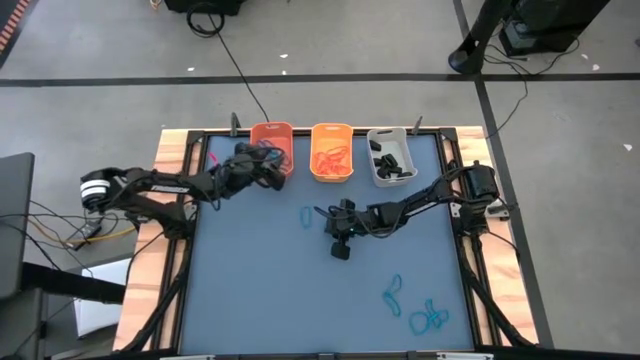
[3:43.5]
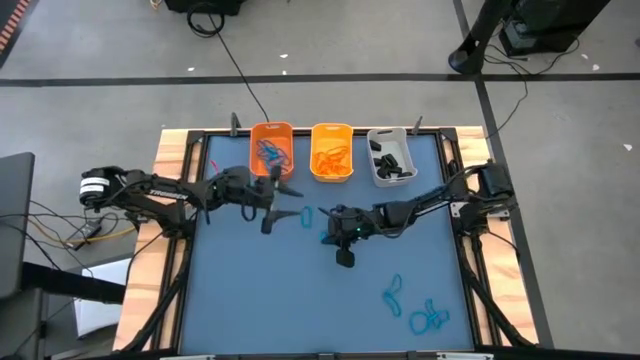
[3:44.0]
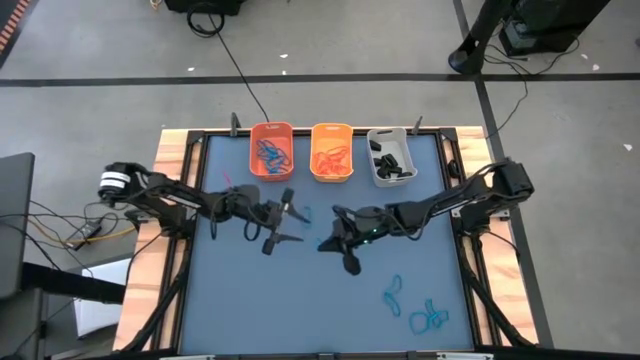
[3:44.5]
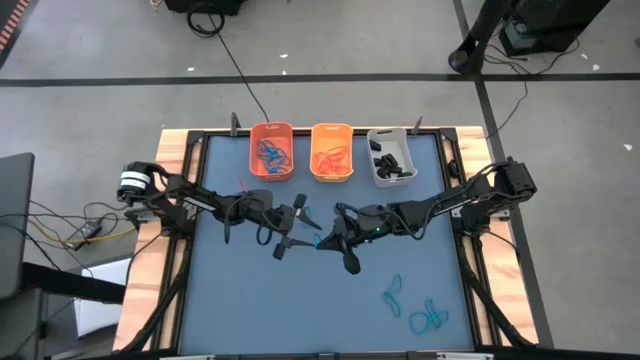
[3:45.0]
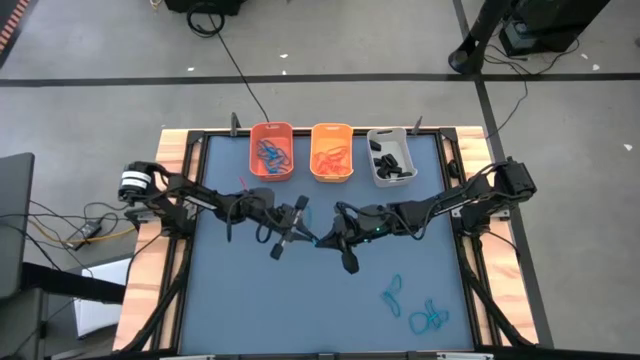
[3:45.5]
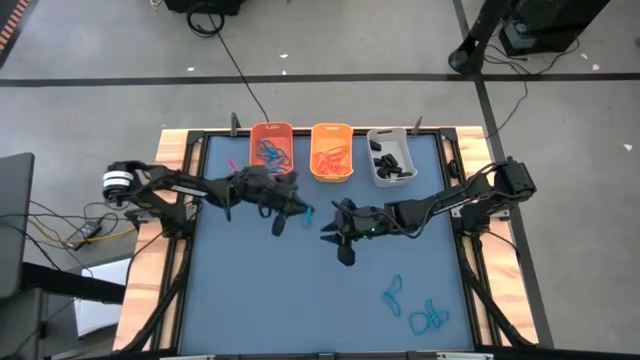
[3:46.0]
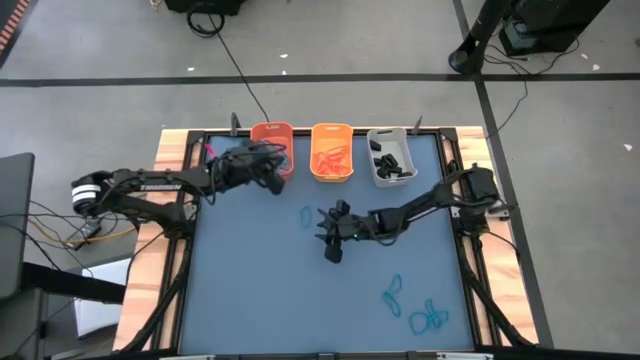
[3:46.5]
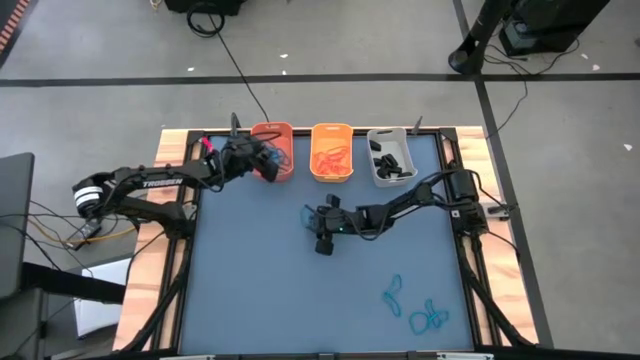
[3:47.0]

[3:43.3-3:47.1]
Task: Sort rubber bands into baskets
Put the blue rubber band into the orange bin

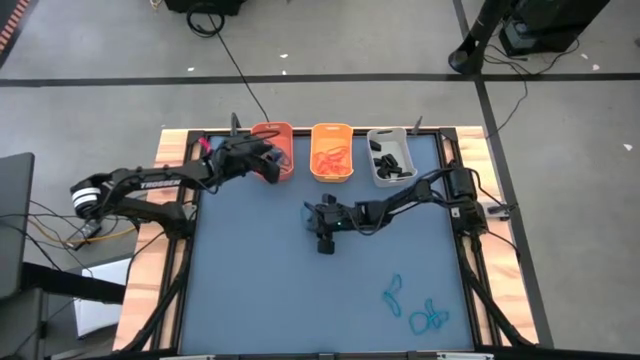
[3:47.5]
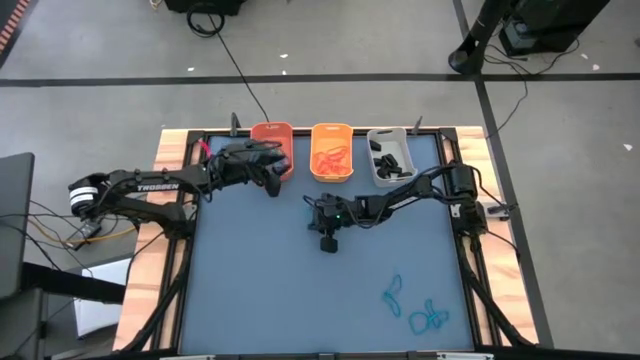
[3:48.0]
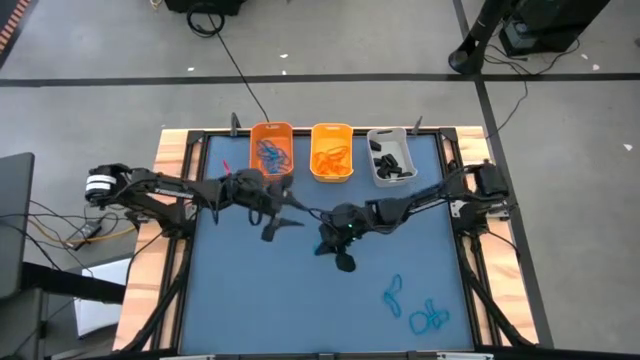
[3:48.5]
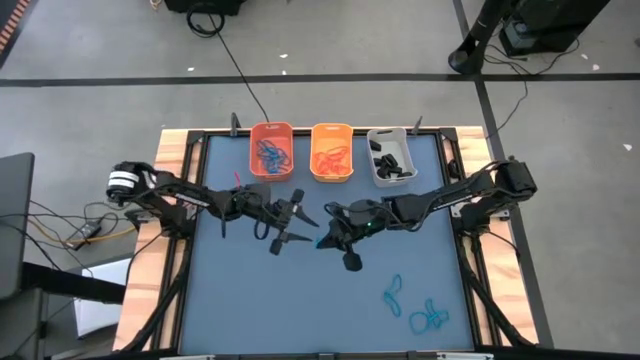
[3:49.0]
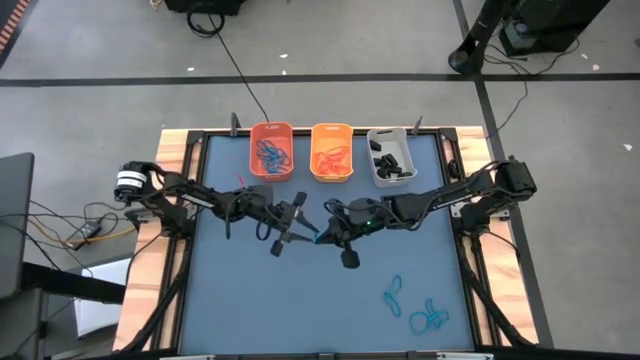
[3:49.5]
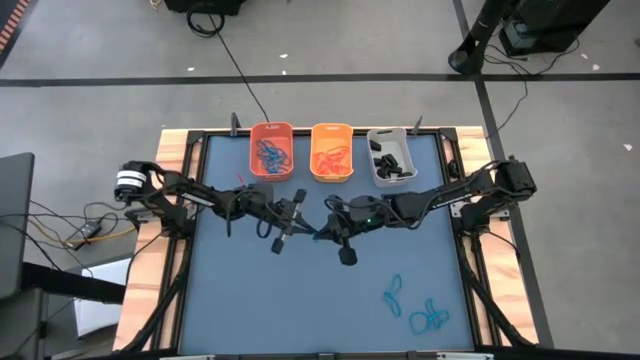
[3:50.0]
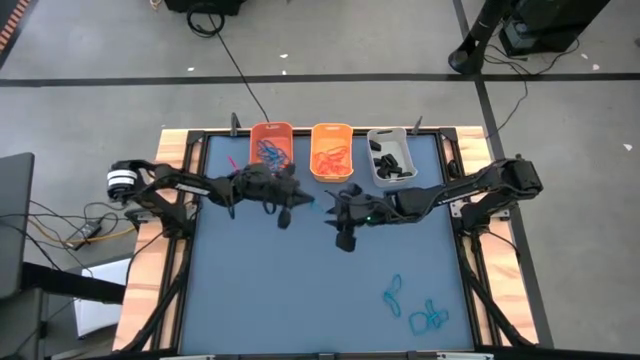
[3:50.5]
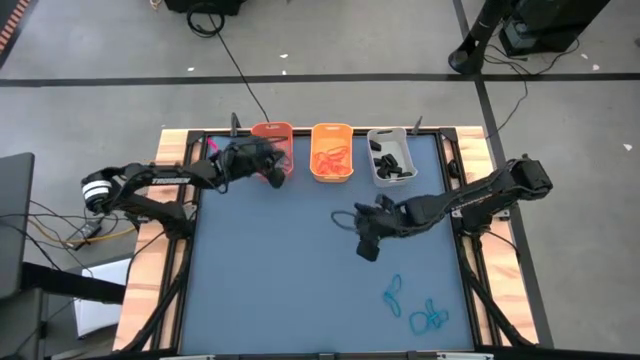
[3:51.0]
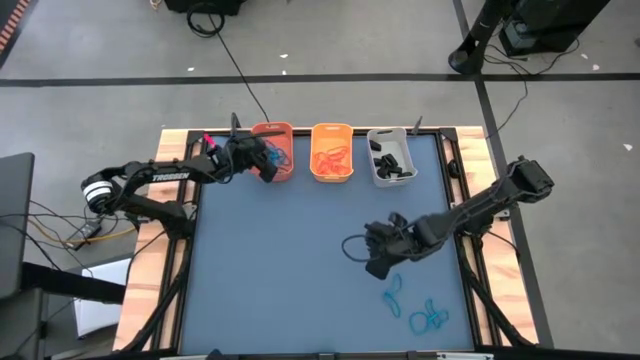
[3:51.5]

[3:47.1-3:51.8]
Put the blue rubber band into the orange bin

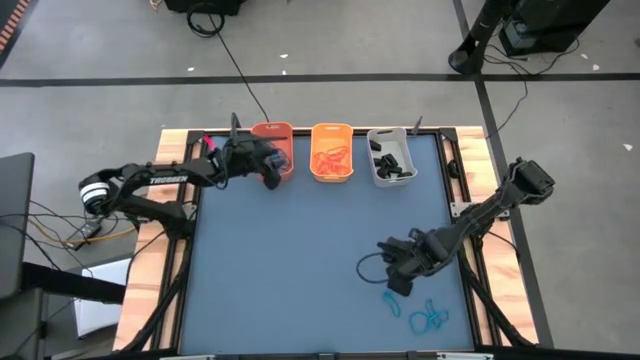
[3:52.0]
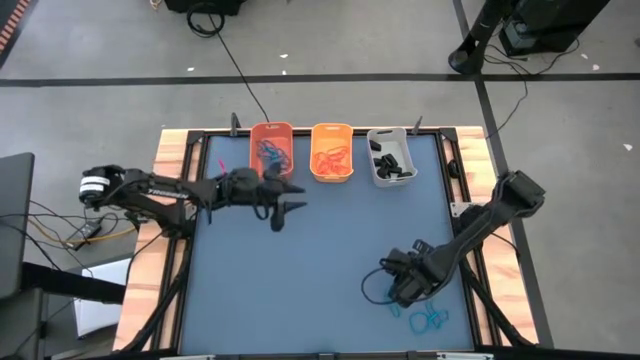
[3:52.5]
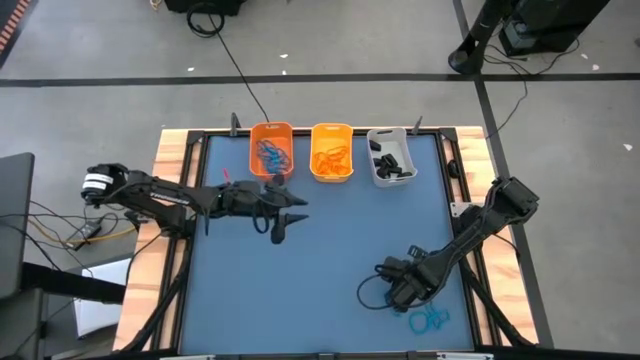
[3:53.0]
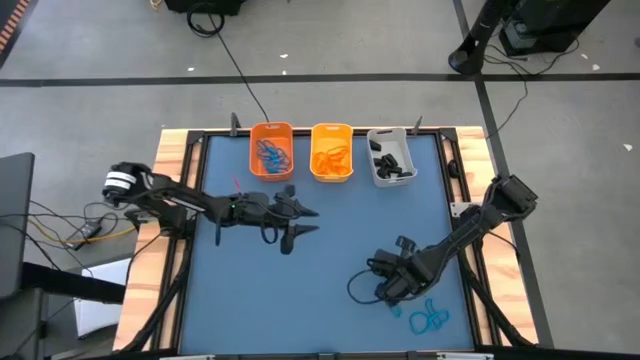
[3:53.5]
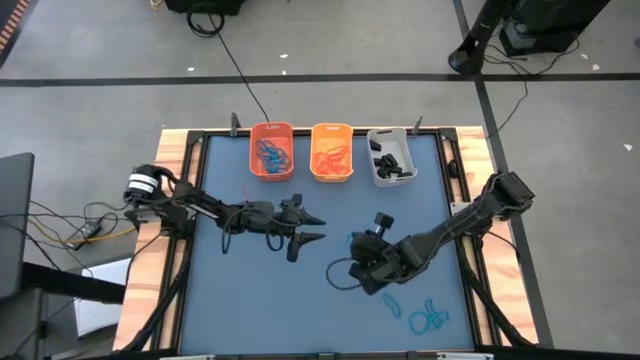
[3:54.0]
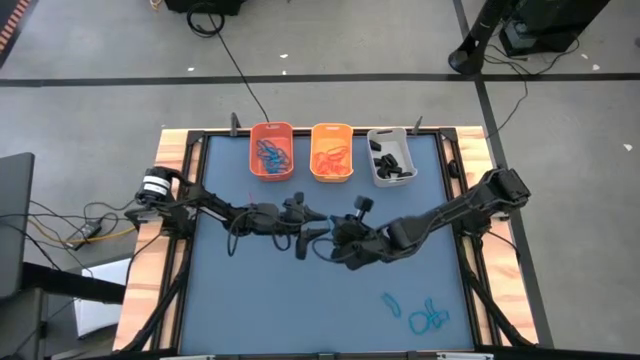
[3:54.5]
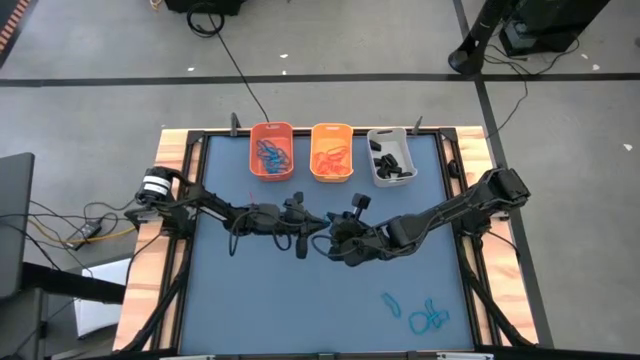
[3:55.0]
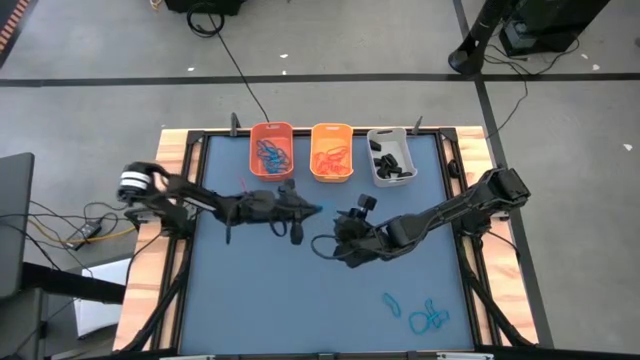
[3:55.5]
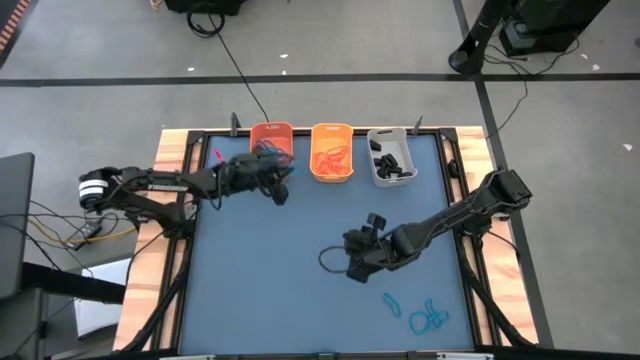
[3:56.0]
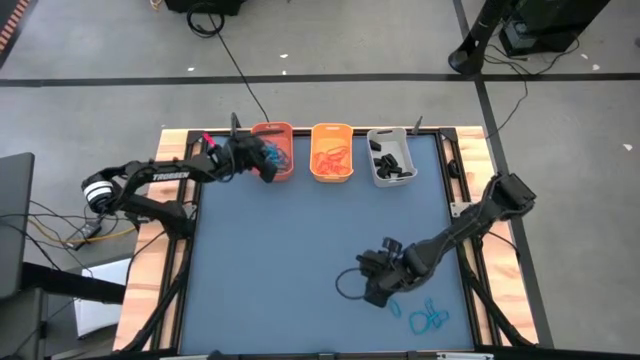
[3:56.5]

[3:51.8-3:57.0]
Put the blue rubber band into the orange bin

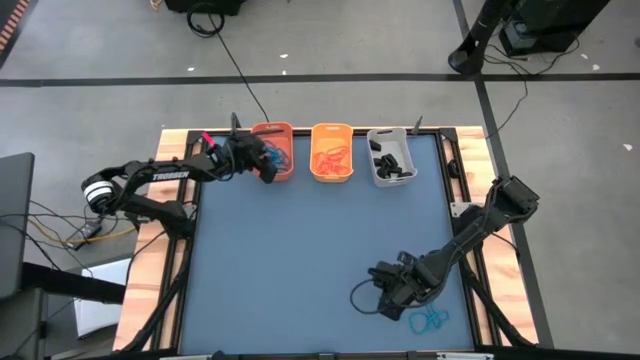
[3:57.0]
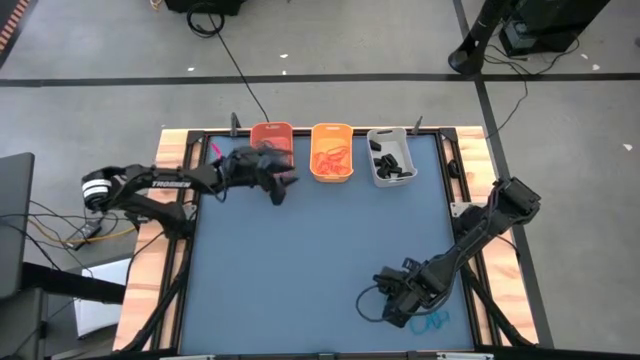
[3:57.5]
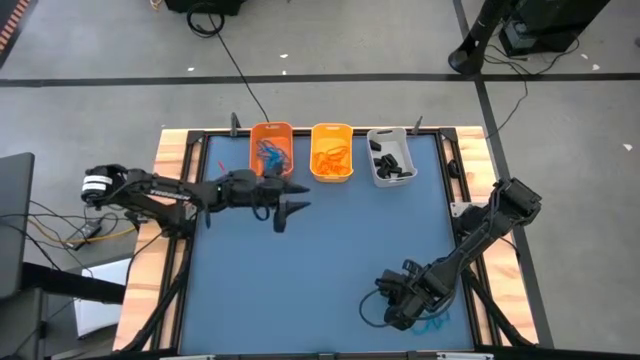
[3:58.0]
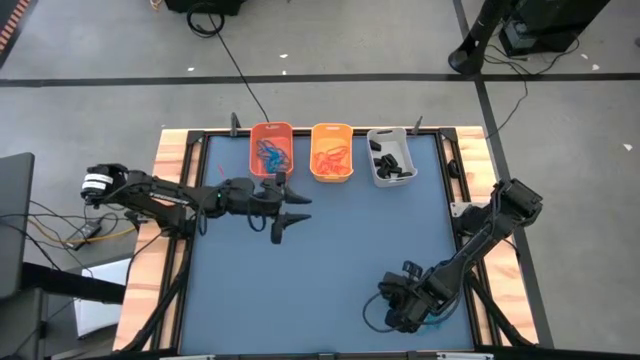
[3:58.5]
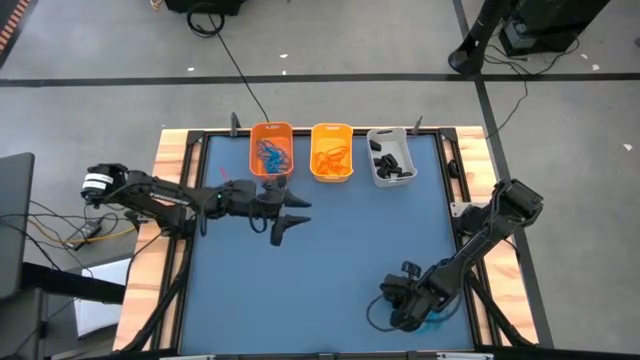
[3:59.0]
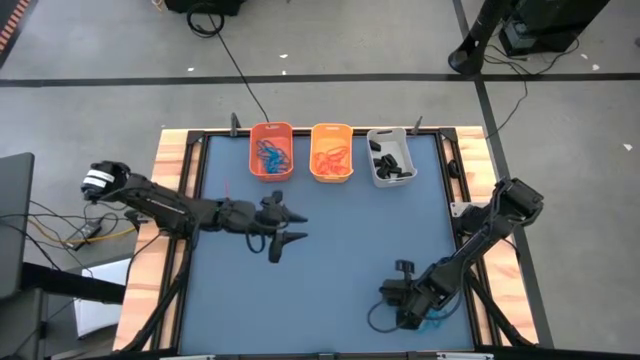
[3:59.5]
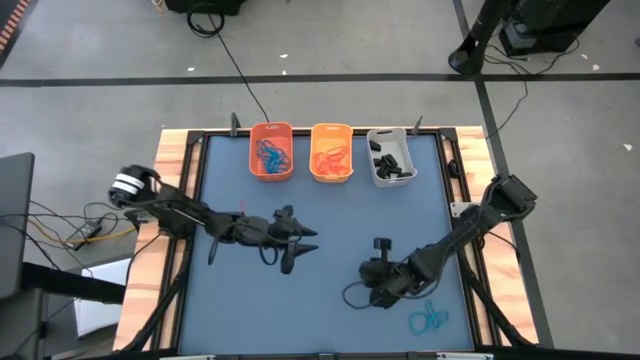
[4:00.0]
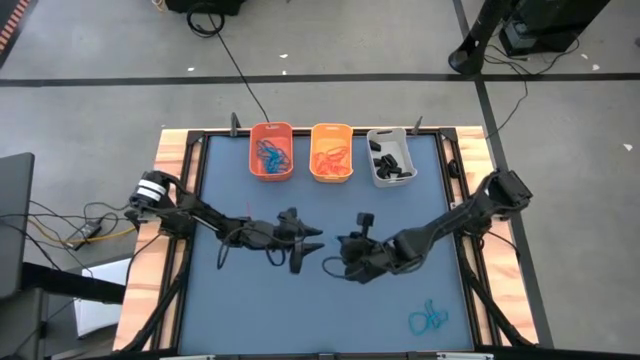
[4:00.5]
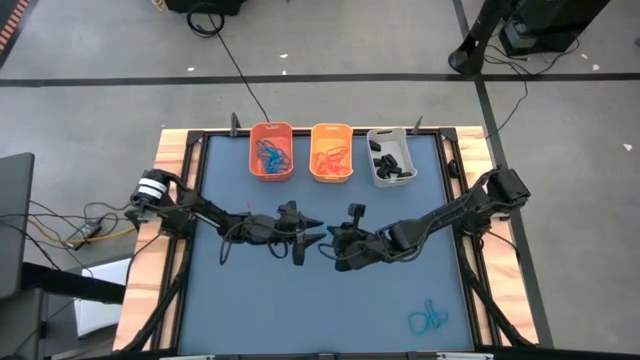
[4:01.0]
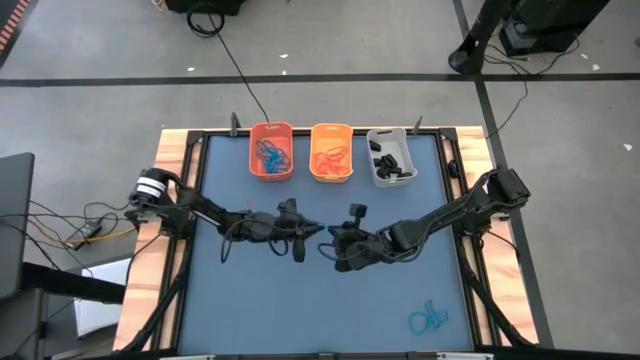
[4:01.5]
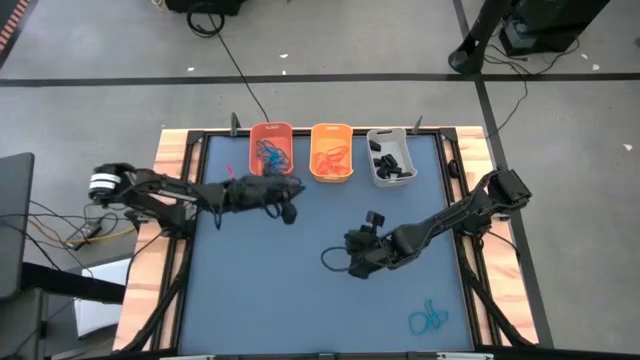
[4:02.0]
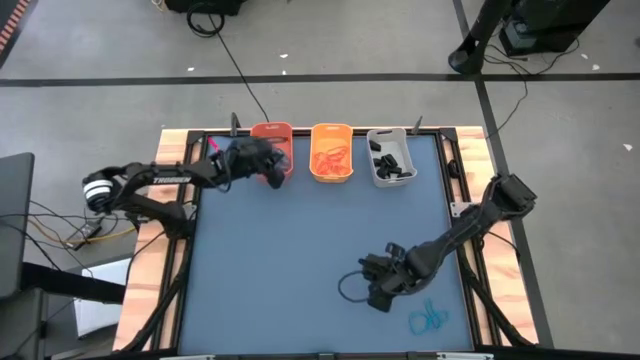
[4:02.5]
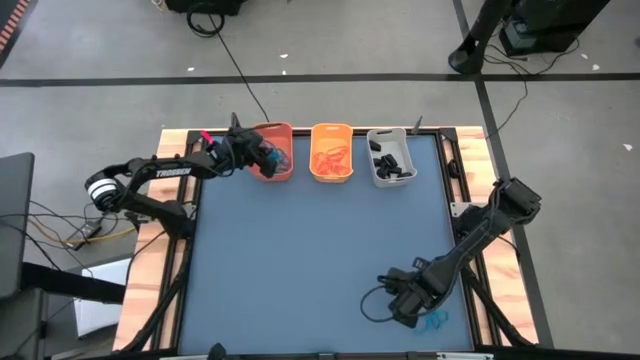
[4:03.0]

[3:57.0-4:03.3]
Put the blue rubber band into the orange bin

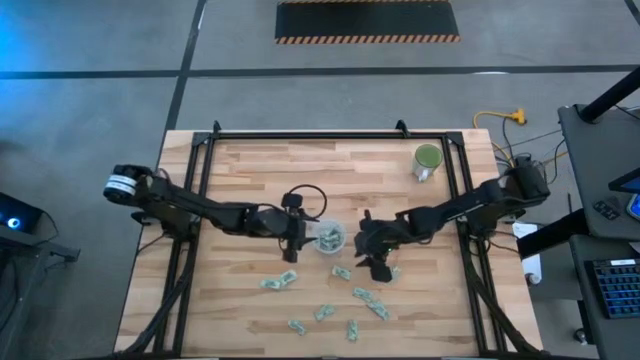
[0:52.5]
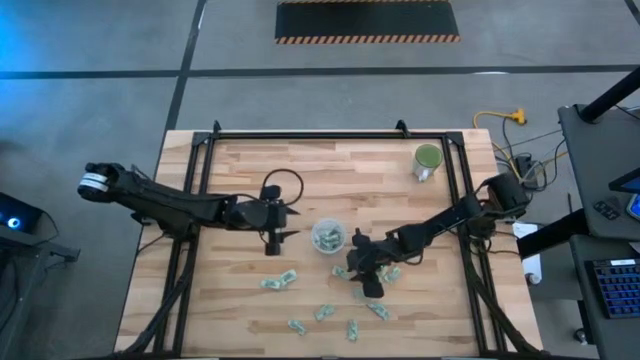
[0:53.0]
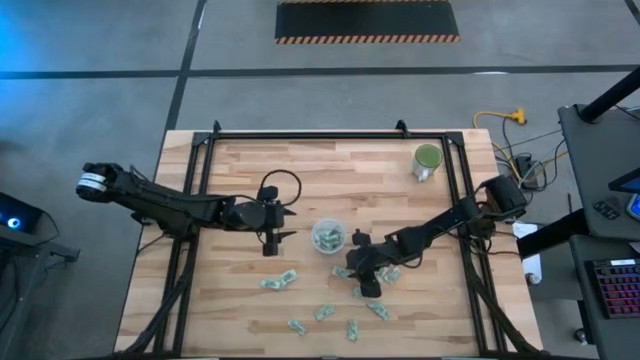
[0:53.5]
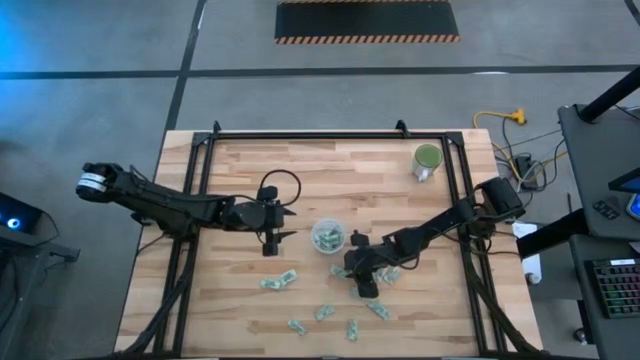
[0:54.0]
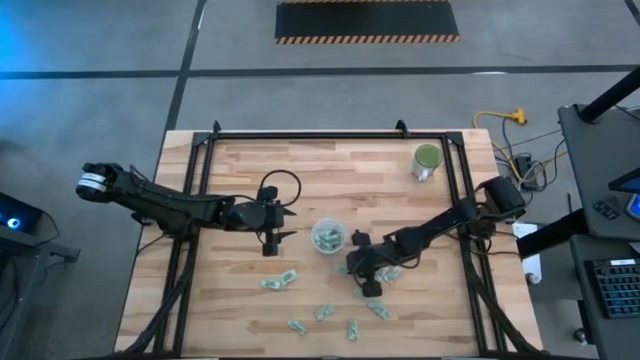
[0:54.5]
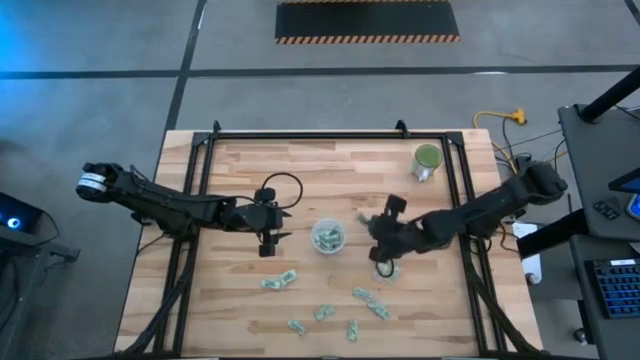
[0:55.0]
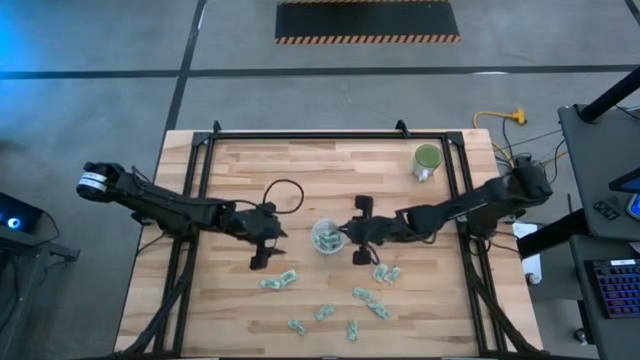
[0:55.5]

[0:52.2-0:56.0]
Task: Pick and place Stevia / Truvia into bins
Put the light green stevia packet into the transparent container
